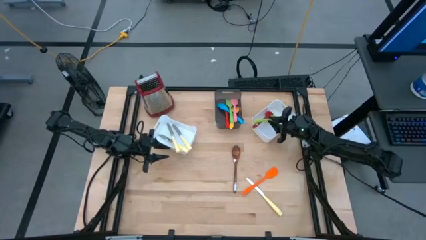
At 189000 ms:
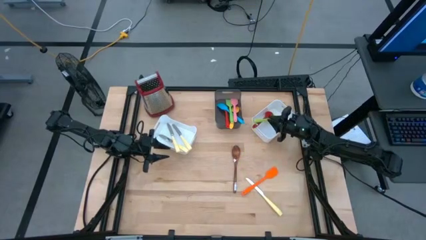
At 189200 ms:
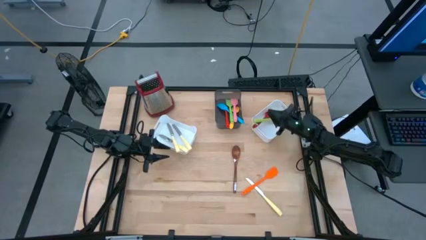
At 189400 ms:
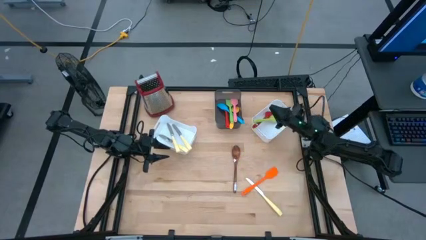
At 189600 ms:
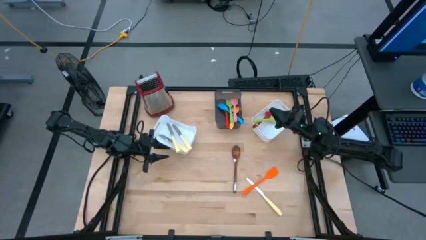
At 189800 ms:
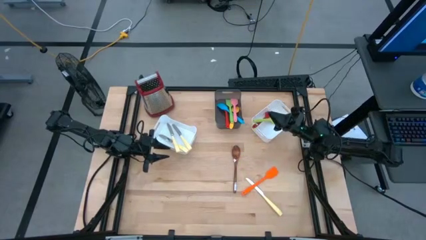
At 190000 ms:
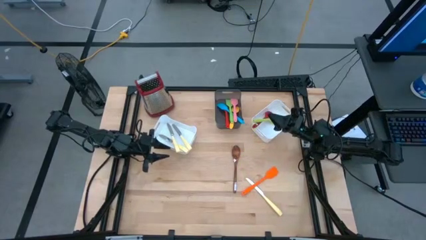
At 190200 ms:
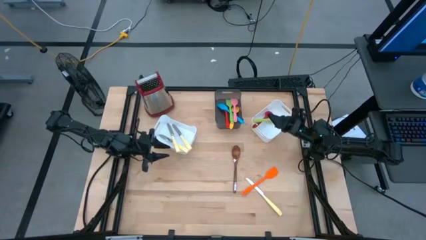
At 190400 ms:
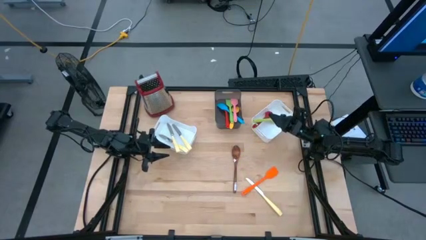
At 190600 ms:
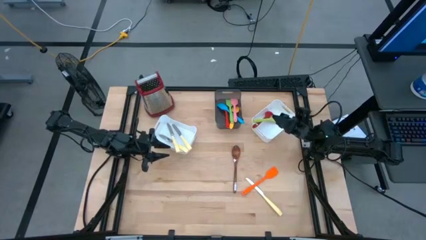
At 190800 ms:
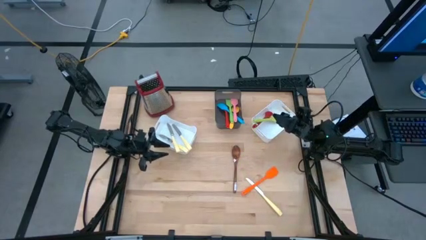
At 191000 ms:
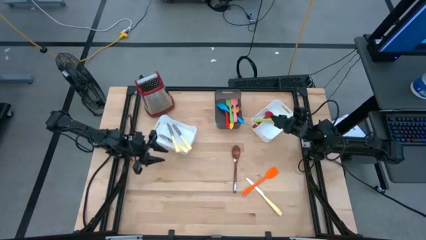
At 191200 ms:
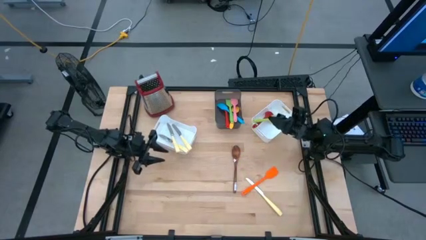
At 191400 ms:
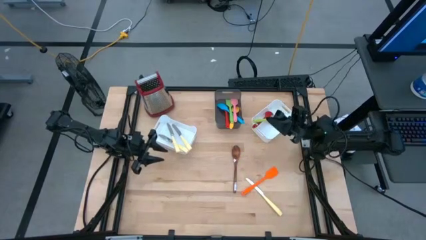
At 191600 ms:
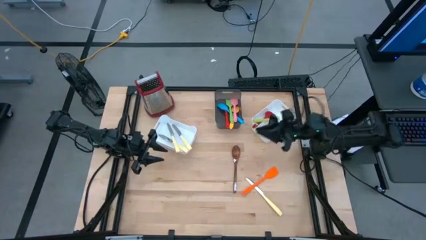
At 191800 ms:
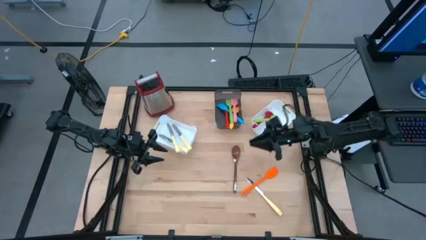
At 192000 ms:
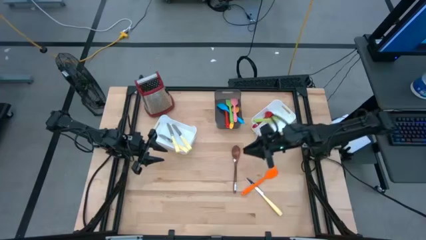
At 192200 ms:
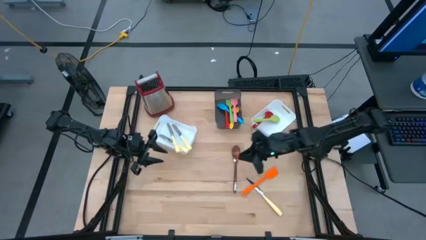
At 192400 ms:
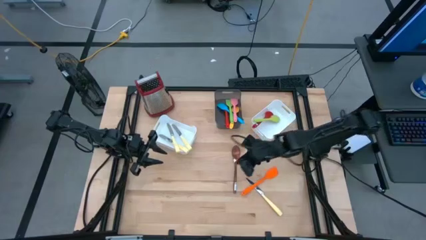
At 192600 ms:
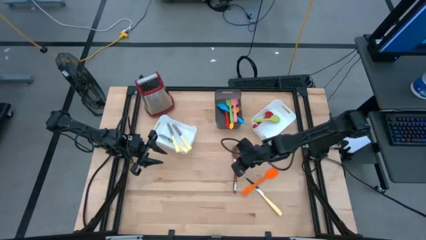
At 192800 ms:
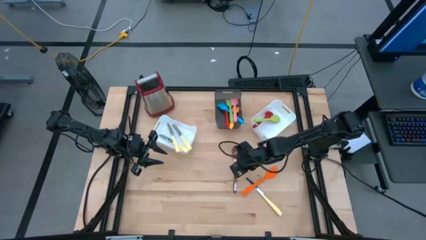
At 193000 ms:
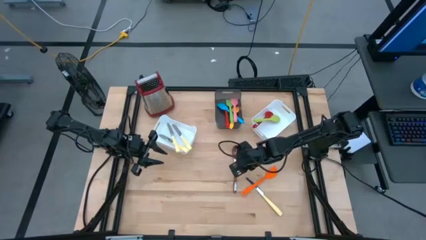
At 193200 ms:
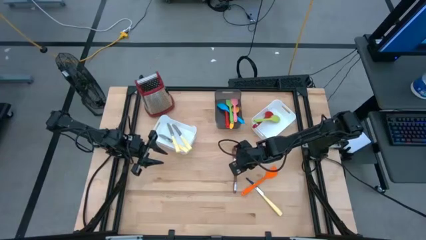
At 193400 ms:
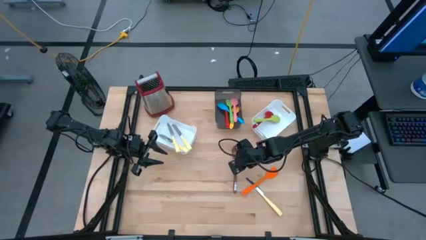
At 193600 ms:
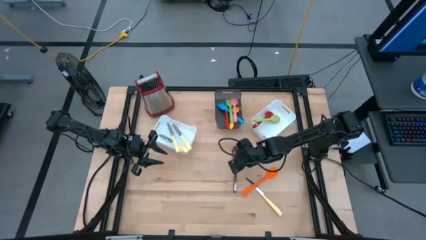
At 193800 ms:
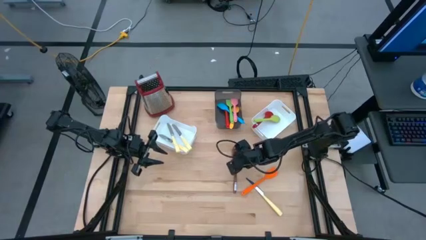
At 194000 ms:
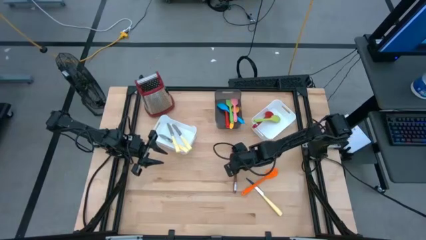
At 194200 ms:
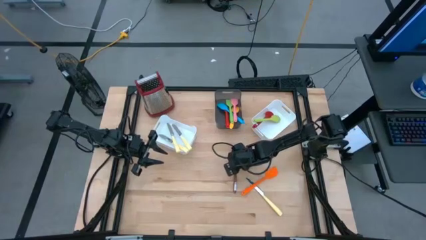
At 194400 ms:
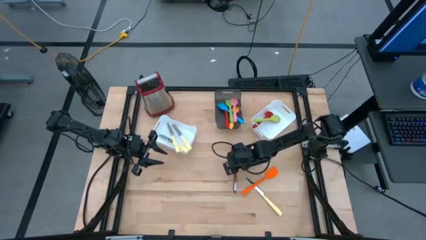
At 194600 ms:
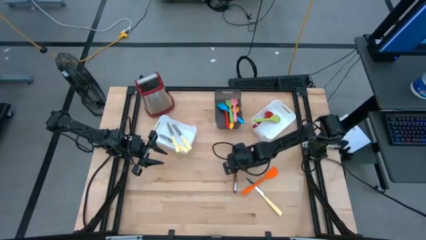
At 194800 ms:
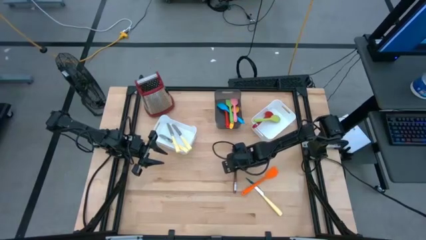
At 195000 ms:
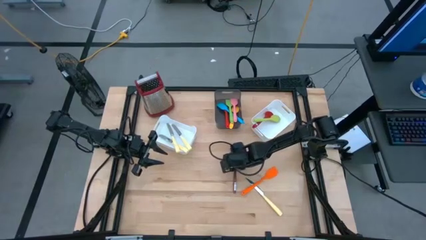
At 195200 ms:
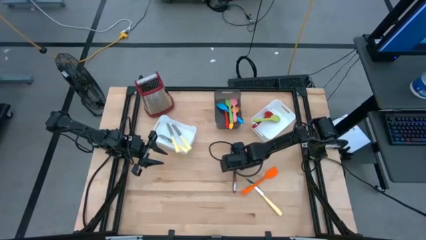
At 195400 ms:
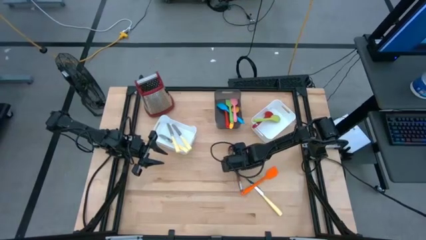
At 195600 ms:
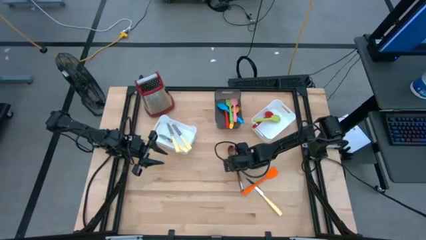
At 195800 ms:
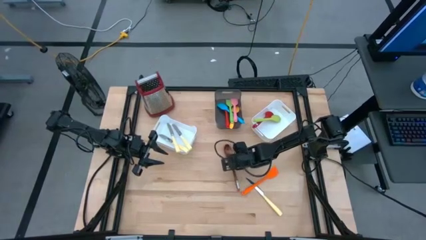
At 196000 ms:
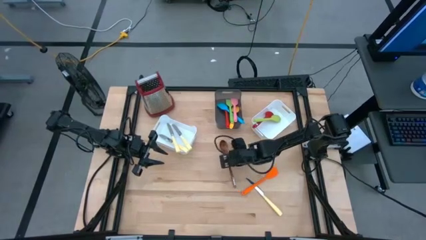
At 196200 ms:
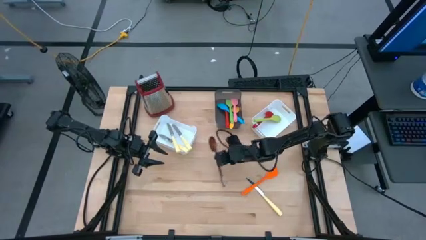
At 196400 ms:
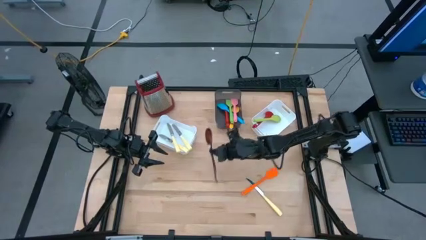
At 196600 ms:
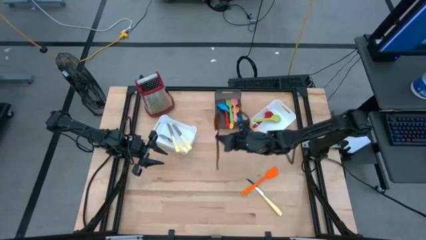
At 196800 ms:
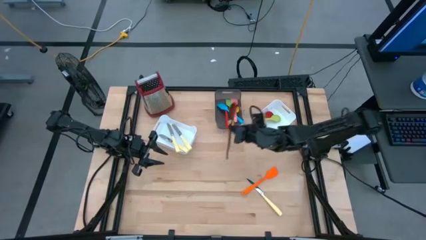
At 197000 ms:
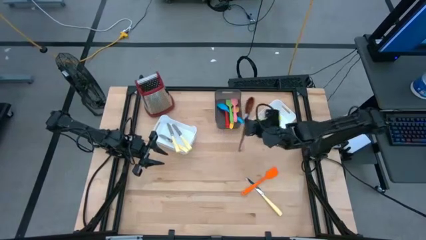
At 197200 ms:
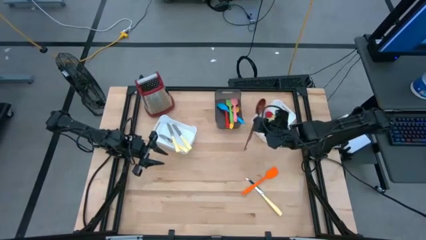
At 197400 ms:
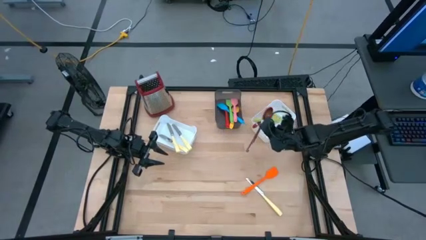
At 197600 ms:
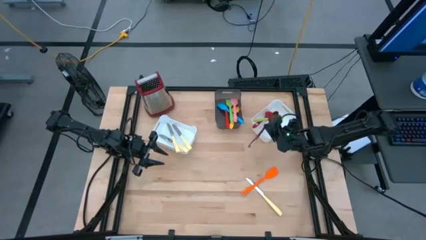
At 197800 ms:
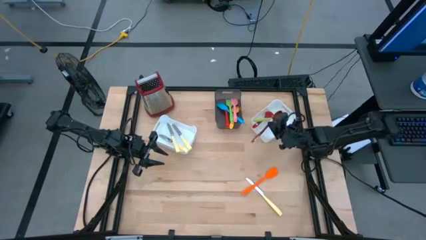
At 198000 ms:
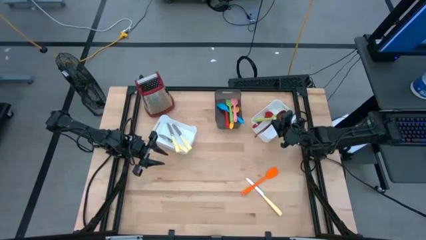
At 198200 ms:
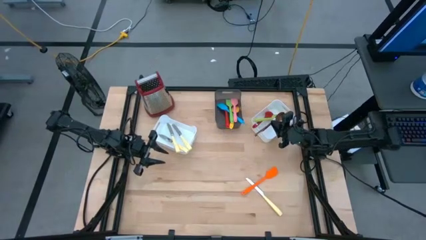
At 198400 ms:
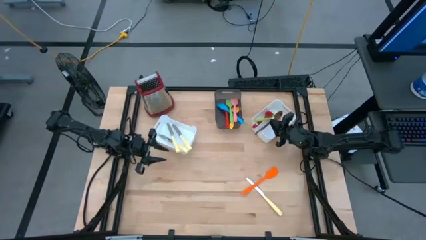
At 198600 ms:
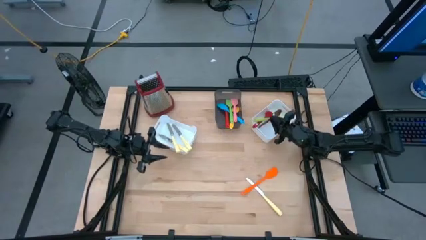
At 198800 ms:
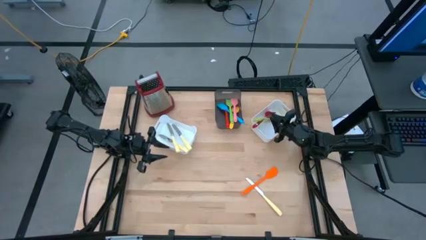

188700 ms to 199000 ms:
Task: Pick & Place Kitchen Items
Put the wooden slotted spoon into the right white bin
